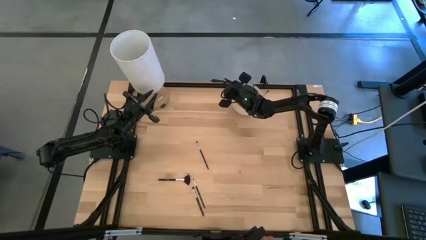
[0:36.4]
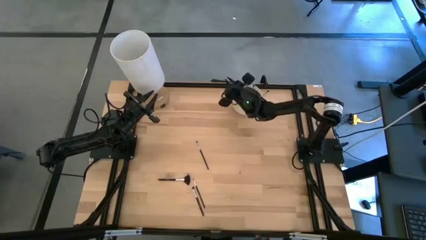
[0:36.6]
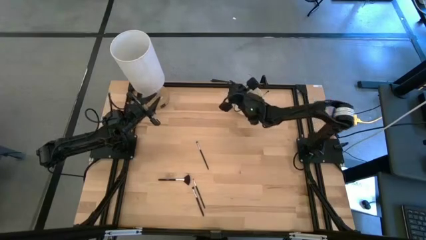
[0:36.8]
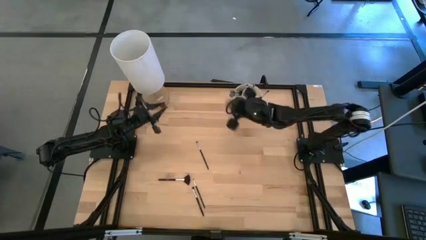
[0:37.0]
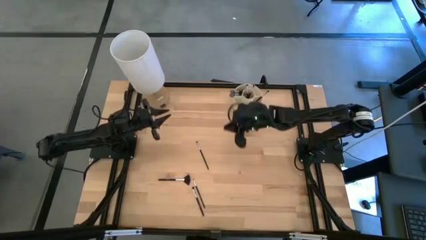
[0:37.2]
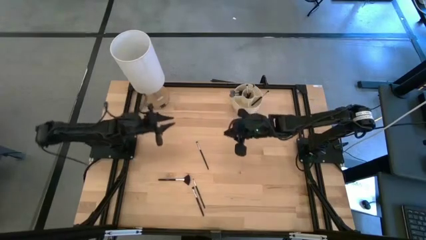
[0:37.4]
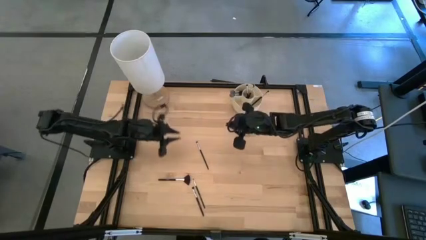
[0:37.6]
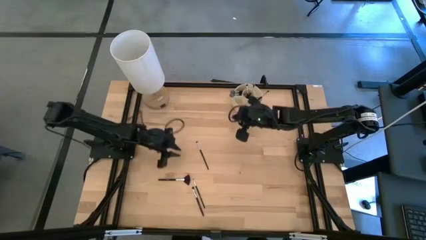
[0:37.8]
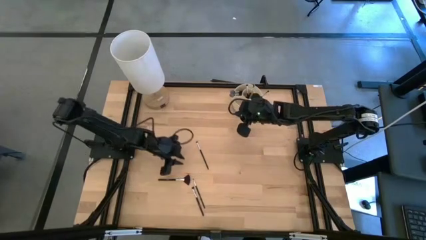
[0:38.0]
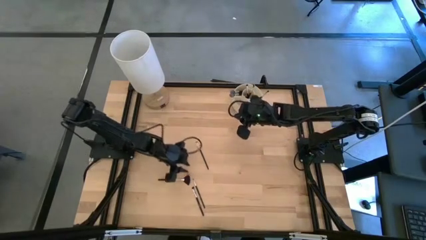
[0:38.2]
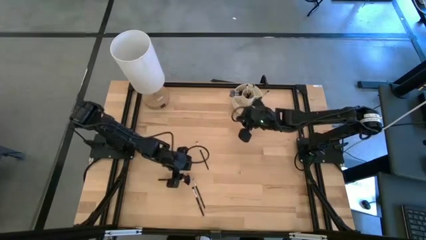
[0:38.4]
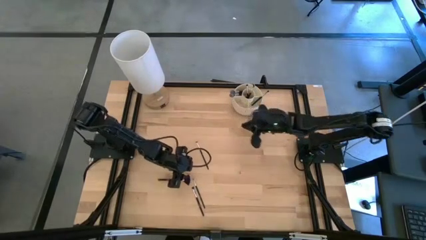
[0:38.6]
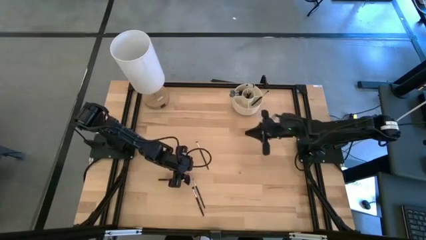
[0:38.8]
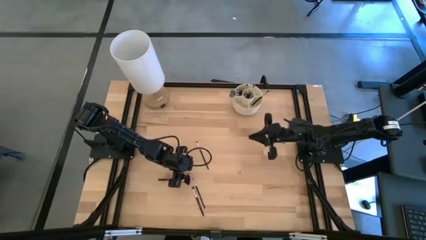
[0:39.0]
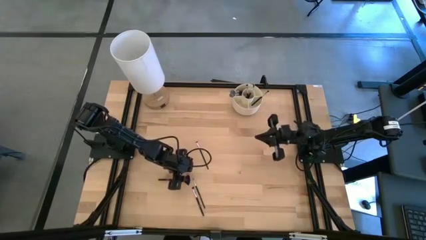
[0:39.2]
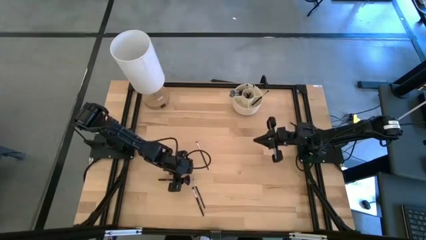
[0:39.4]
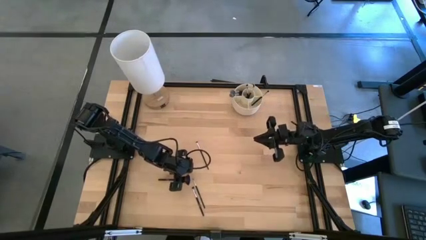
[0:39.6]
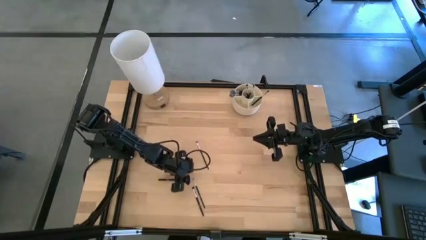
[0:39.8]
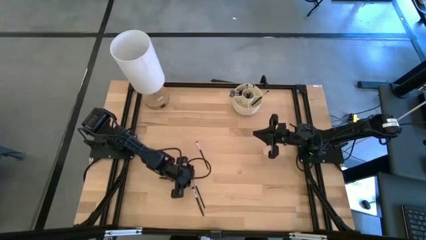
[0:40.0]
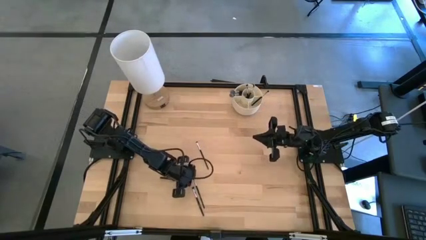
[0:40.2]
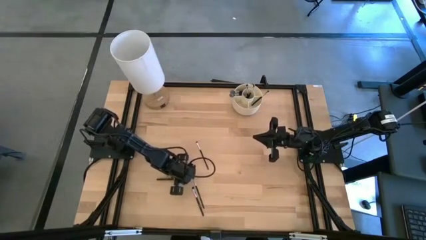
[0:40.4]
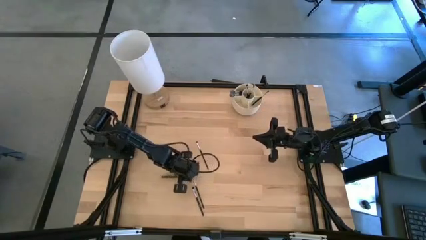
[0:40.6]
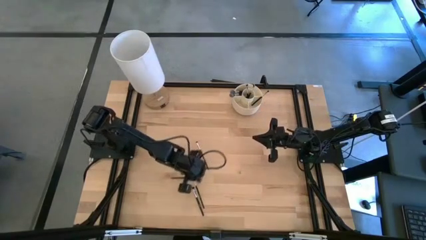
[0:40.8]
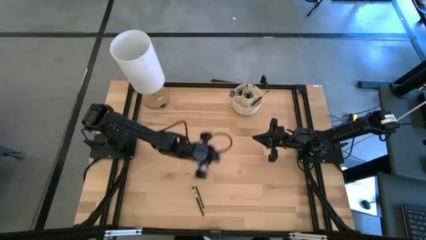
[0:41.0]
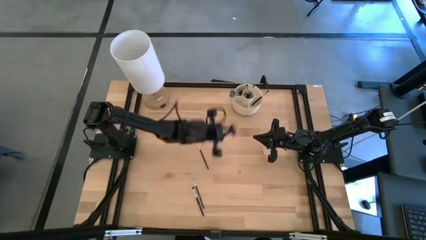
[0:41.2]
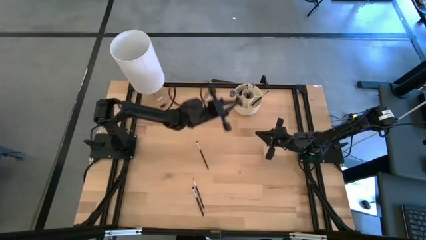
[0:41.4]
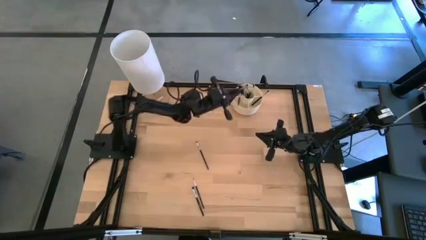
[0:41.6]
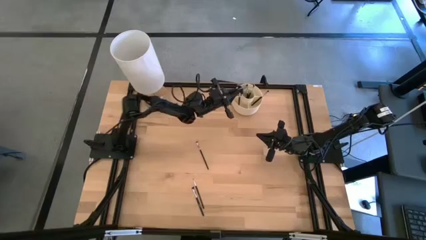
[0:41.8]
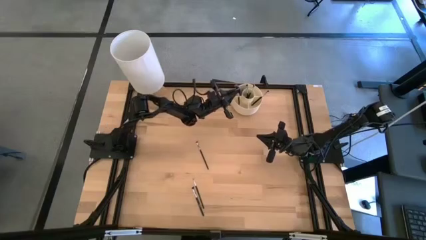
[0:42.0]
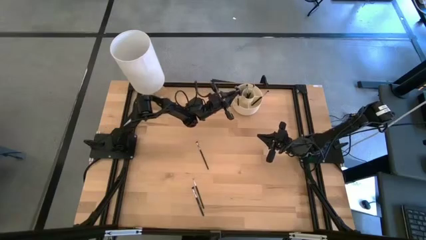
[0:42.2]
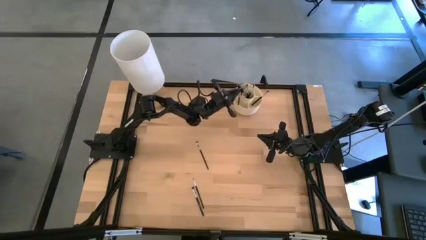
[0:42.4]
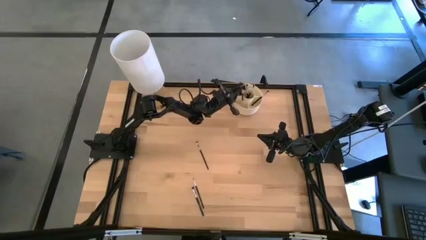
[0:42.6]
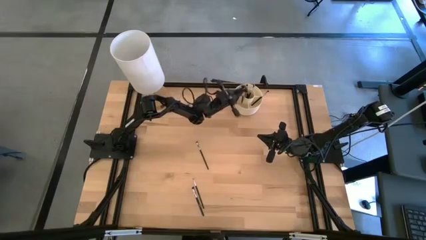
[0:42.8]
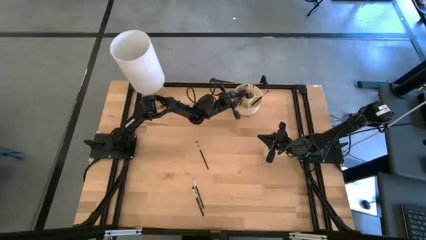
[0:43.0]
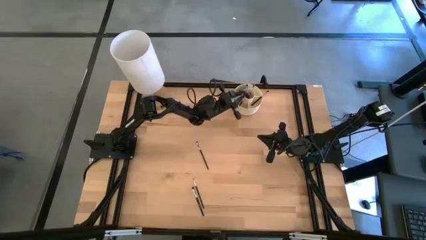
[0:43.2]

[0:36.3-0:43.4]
Task: Sort items
Put the highlighter brush into the pen organizer

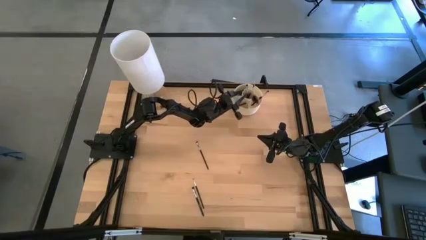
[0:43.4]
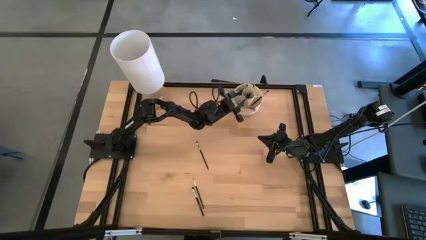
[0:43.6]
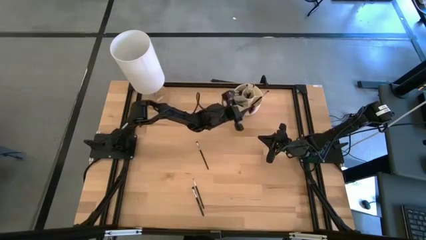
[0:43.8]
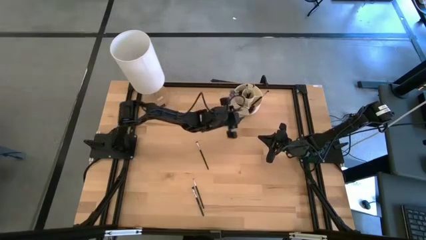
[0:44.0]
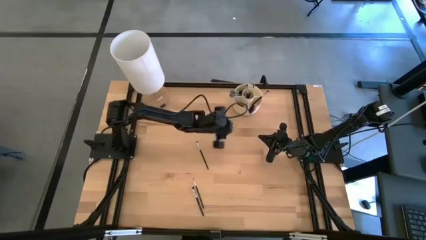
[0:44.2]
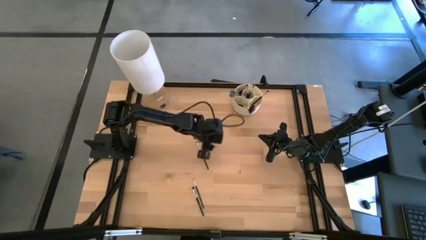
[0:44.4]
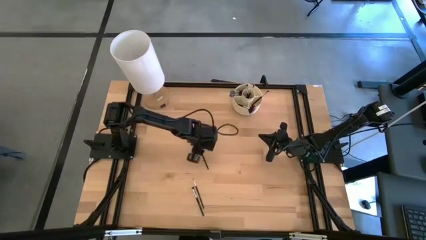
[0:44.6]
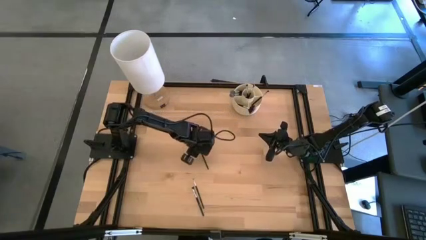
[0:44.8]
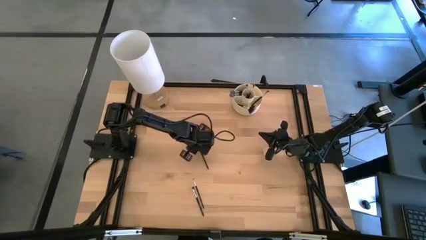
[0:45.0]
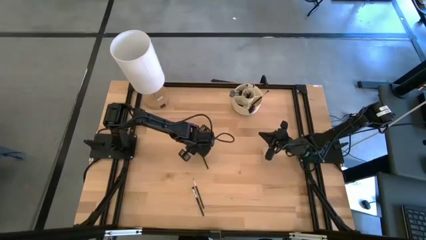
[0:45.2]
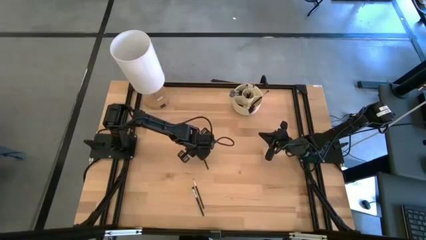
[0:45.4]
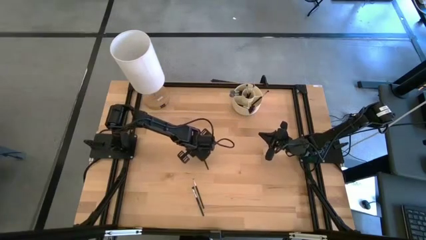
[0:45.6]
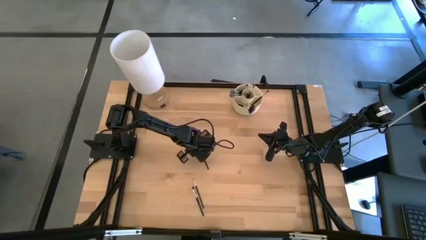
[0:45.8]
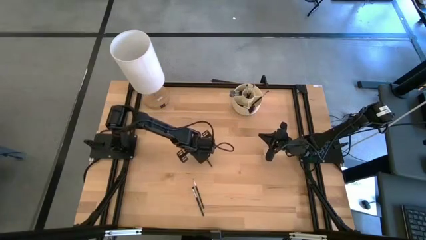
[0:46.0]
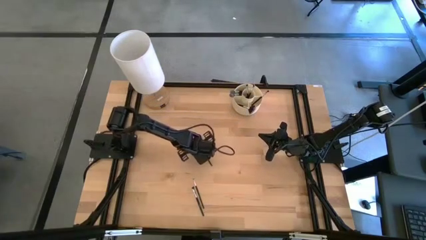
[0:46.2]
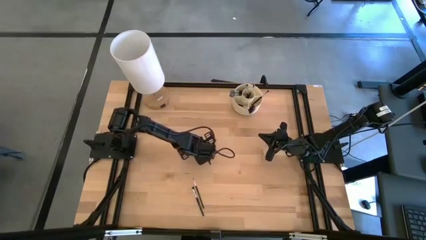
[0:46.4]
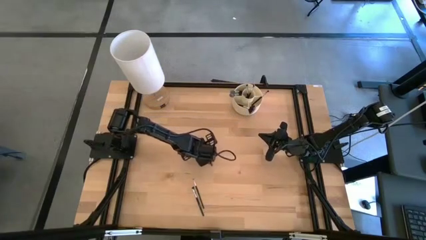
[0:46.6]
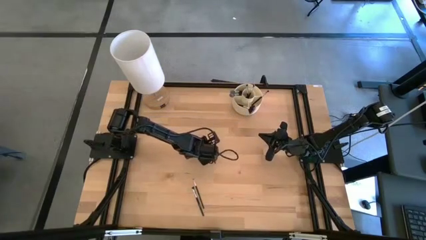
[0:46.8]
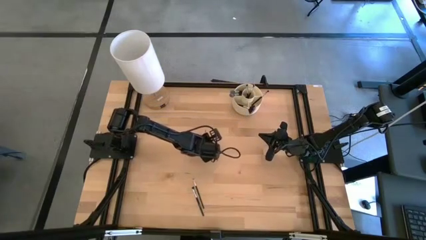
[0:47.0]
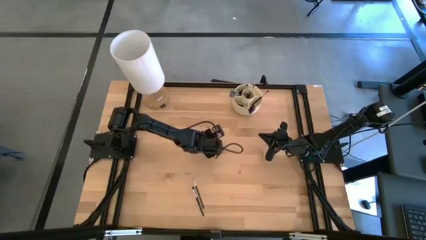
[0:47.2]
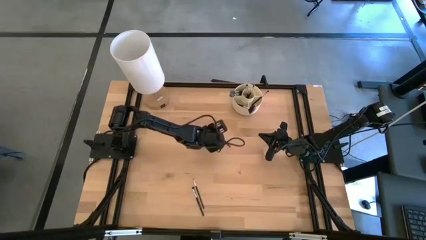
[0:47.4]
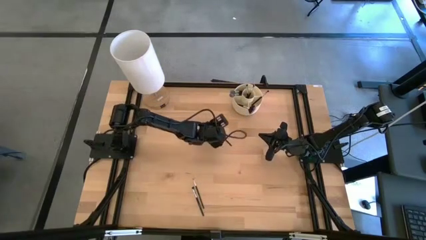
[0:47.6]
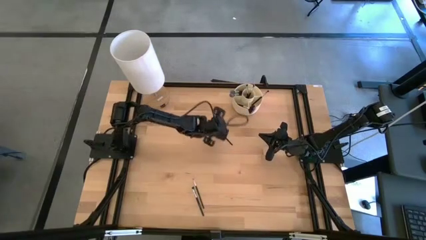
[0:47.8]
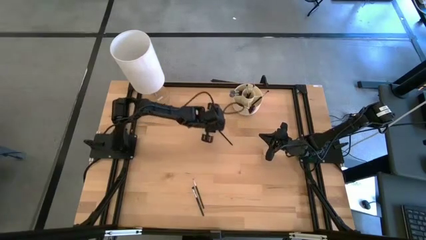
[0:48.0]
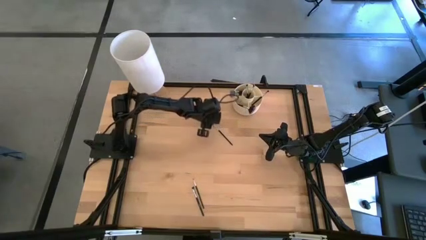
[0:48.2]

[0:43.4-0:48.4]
Put the foundation brush into the pen organizer

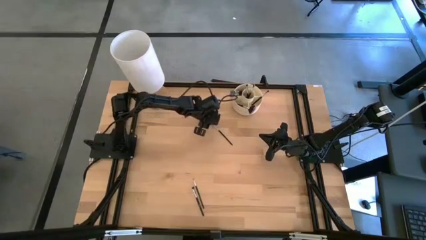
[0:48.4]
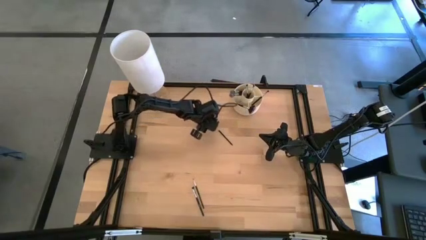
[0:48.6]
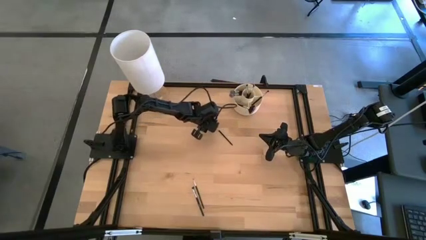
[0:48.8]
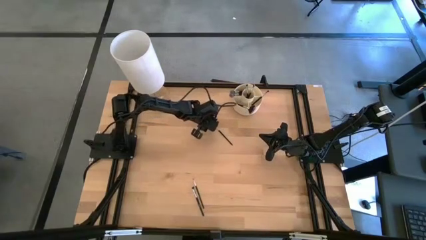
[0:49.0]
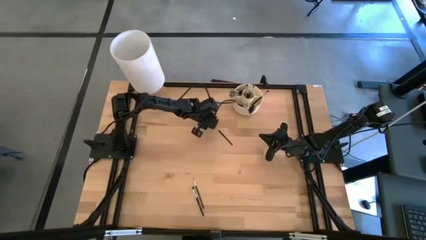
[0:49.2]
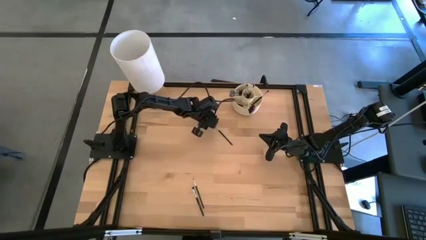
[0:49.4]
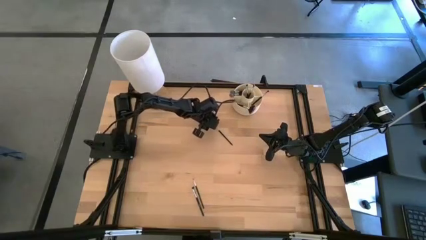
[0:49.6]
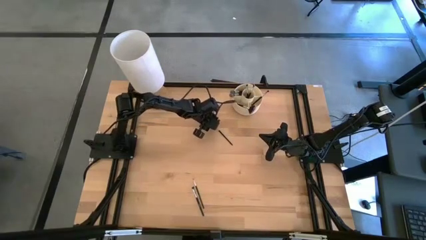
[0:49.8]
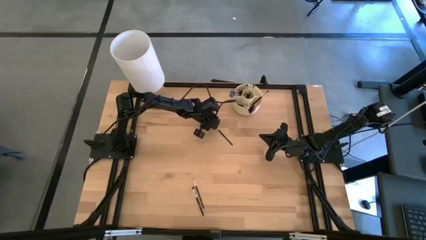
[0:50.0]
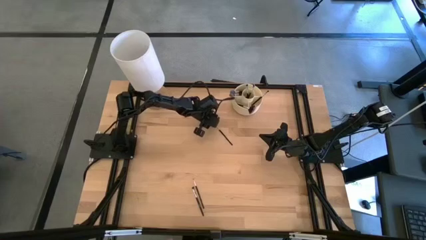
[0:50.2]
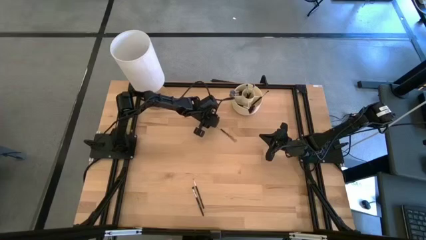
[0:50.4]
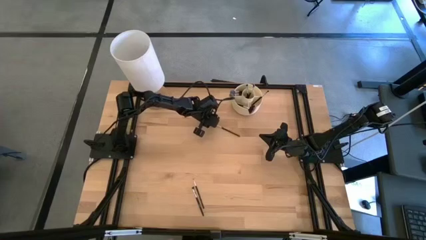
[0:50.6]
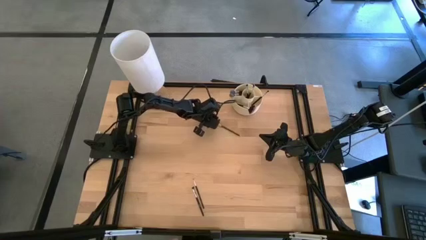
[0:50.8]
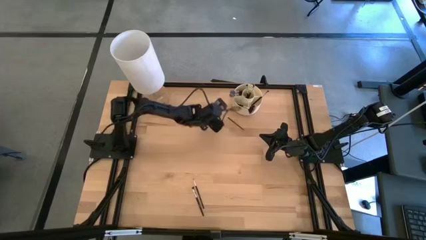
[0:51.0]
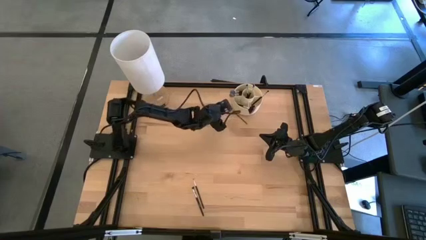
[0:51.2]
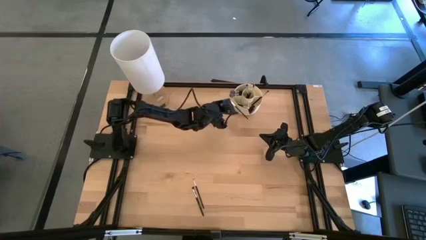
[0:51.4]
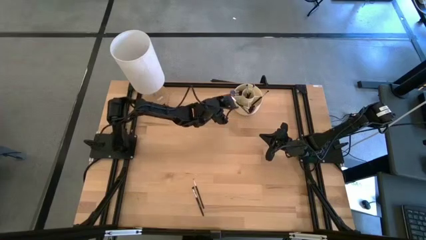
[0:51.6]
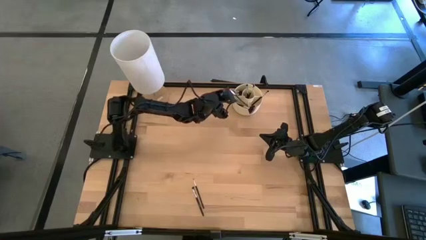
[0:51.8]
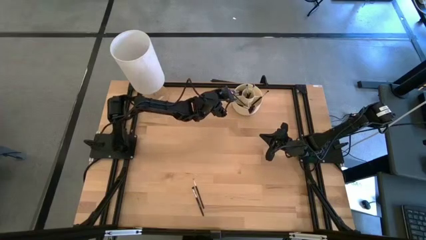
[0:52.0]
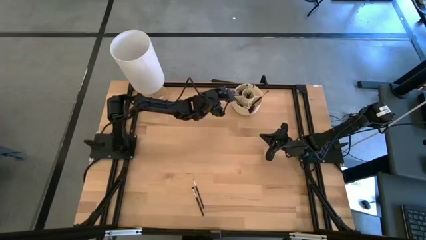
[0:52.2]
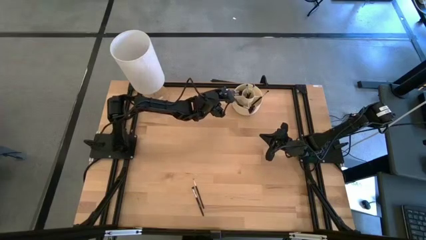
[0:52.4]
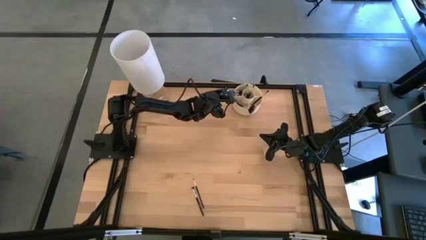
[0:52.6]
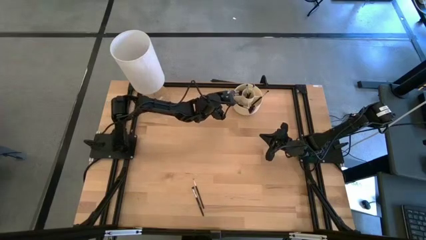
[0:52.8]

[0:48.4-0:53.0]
Put the foundation brush into the pen organizer
